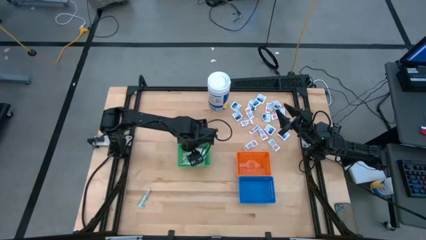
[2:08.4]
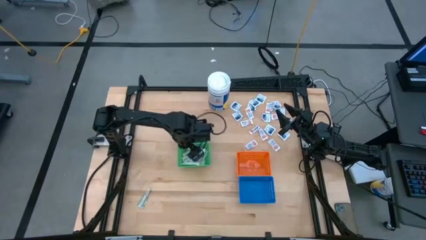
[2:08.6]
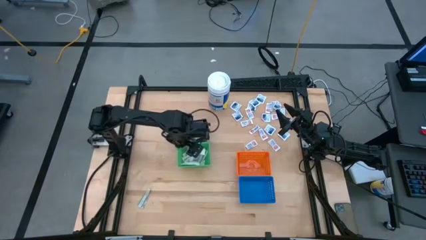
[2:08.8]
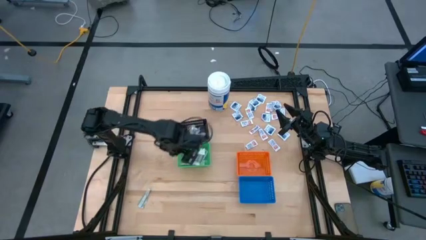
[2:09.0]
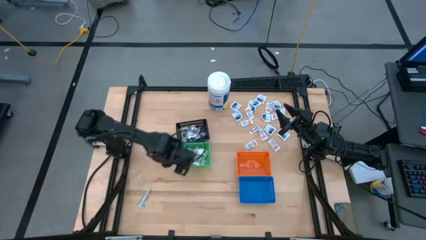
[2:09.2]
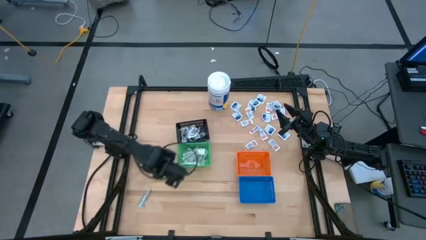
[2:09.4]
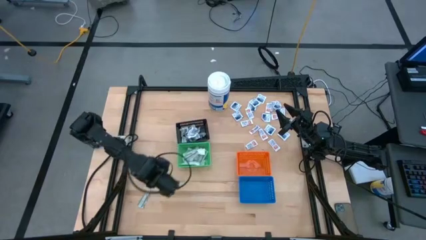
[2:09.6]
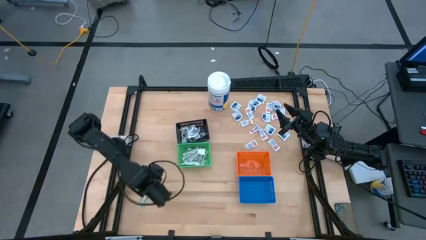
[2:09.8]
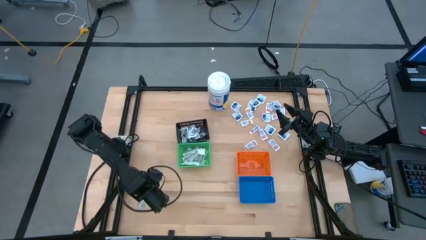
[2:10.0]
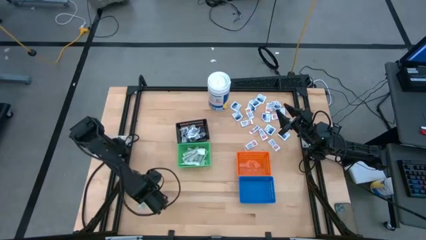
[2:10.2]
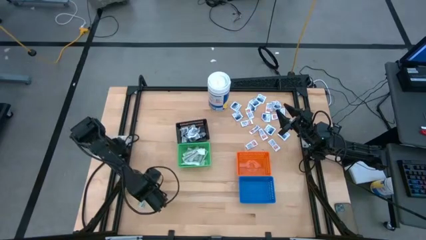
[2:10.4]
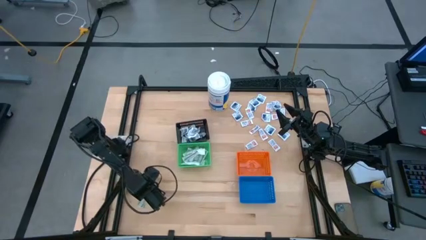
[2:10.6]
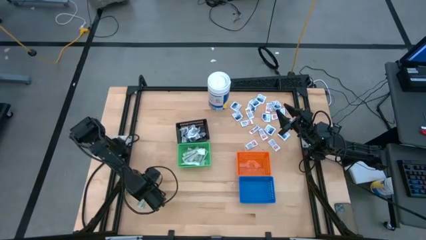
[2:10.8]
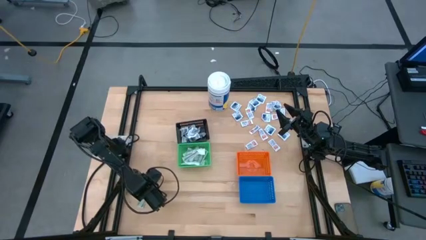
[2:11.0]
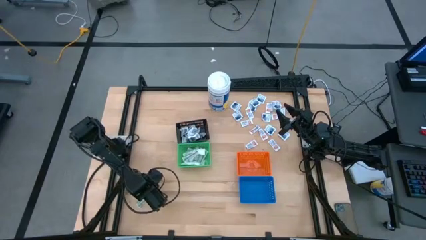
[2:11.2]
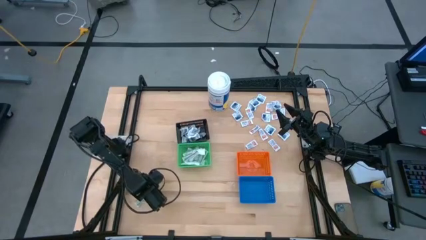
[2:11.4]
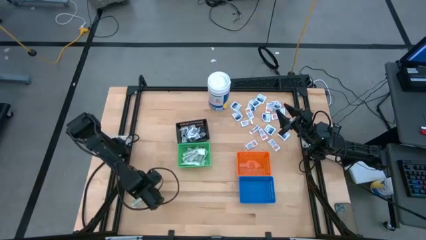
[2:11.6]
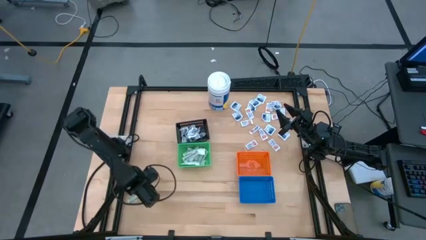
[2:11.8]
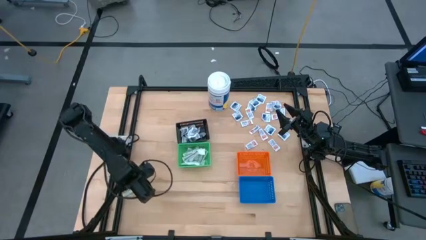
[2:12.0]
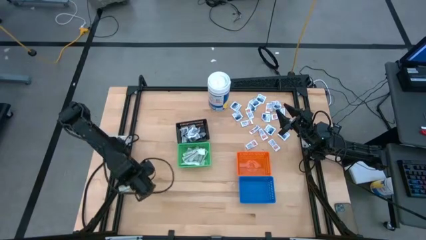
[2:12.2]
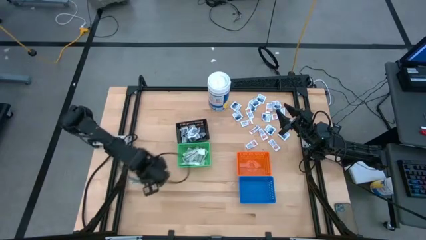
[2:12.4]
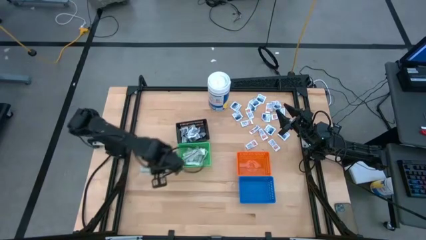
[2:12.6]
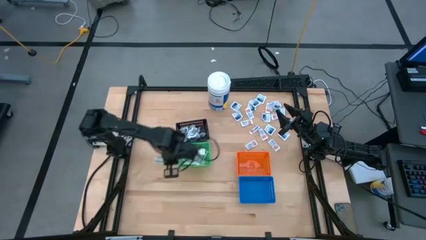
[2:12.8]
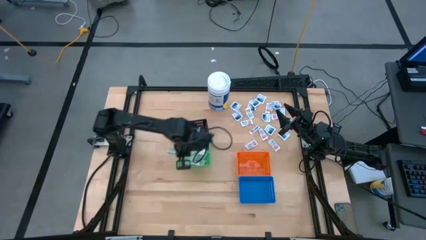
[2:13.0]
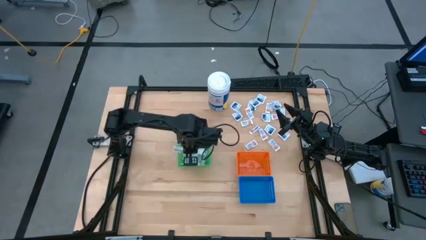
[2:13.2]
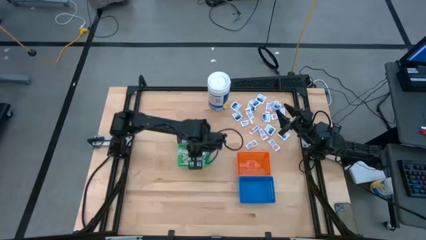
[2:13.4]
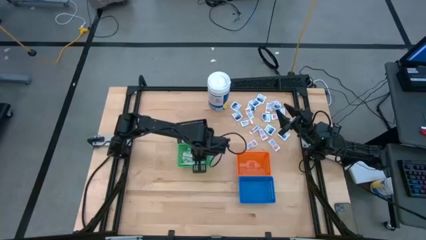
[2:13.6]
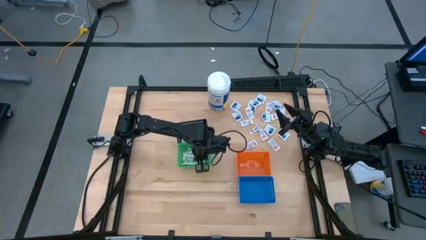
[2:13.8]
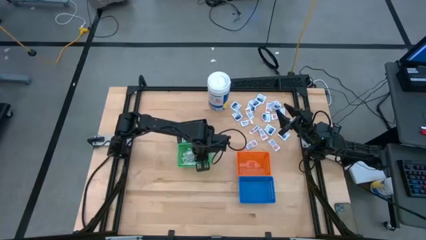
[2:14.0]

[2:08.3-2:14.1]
Task: Pick & Place First Aid Supplies
Put the green bandage into the green bin

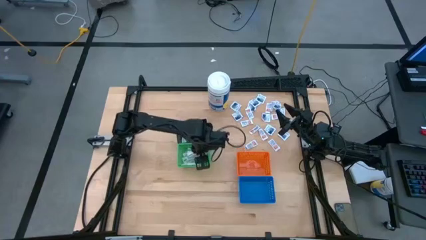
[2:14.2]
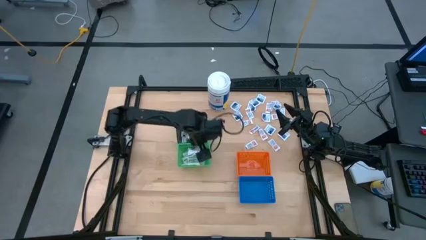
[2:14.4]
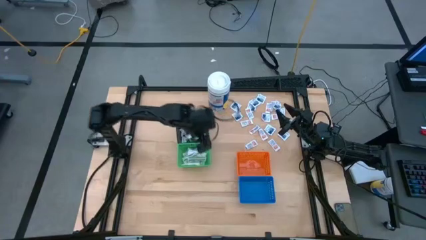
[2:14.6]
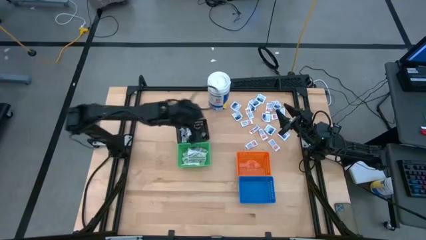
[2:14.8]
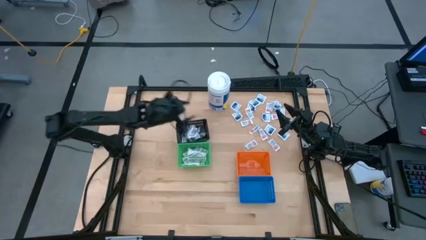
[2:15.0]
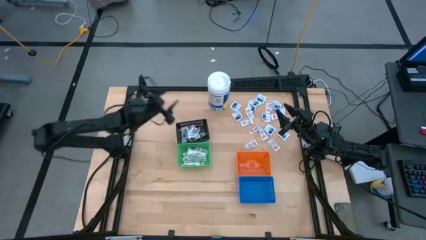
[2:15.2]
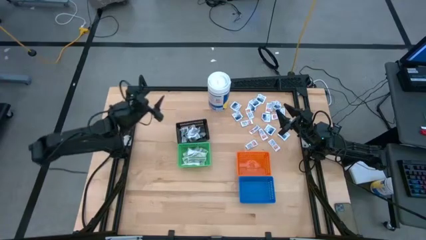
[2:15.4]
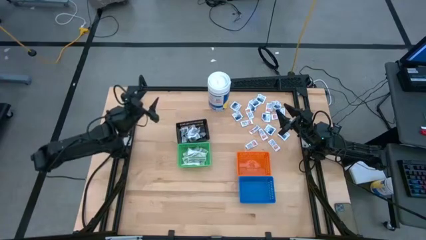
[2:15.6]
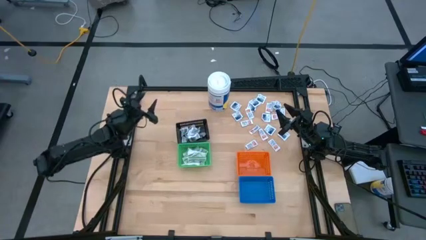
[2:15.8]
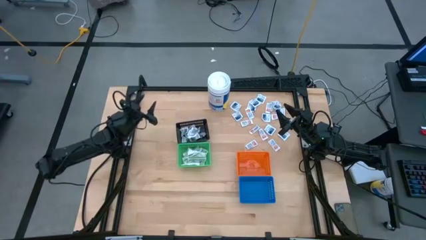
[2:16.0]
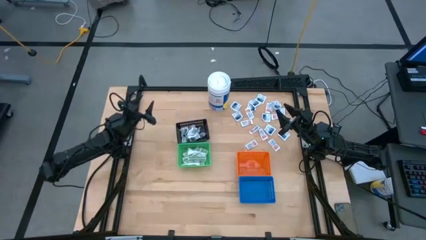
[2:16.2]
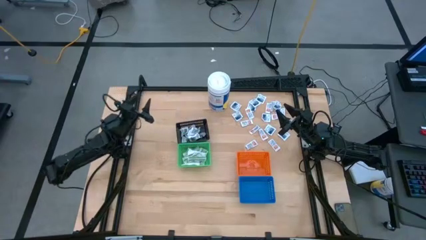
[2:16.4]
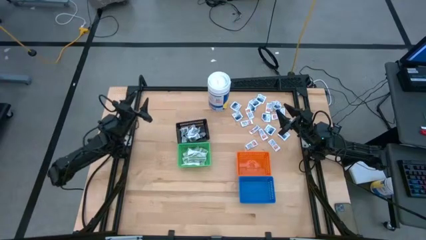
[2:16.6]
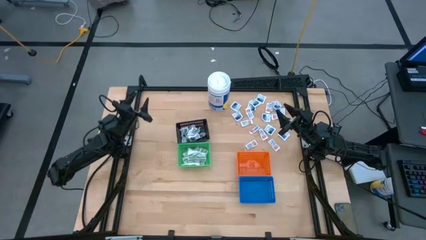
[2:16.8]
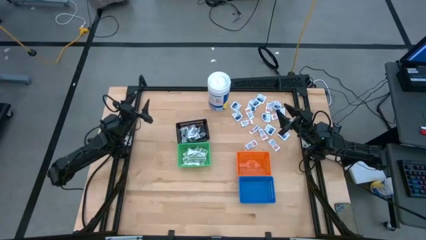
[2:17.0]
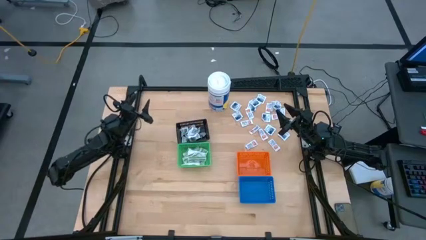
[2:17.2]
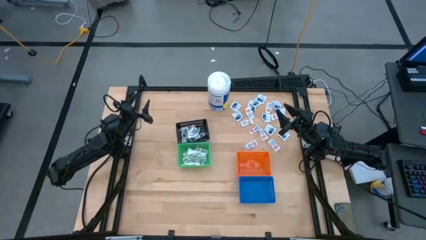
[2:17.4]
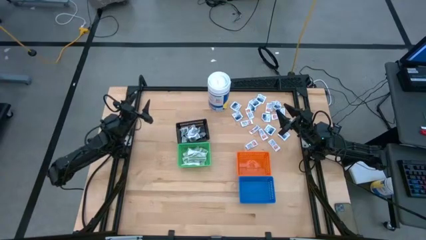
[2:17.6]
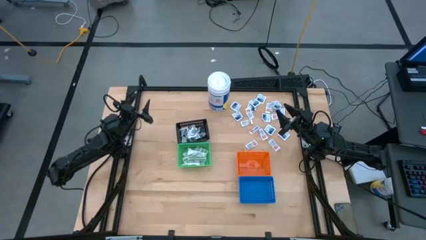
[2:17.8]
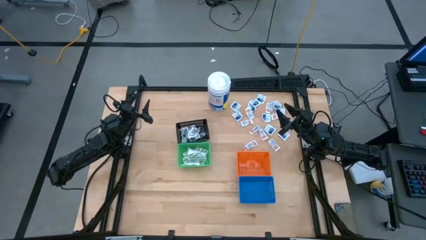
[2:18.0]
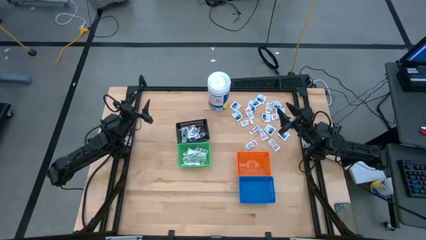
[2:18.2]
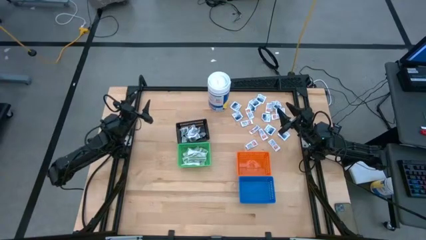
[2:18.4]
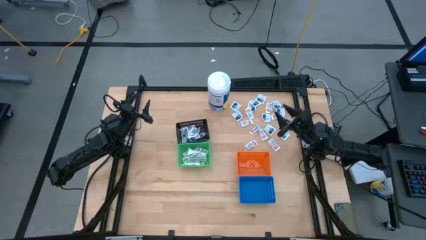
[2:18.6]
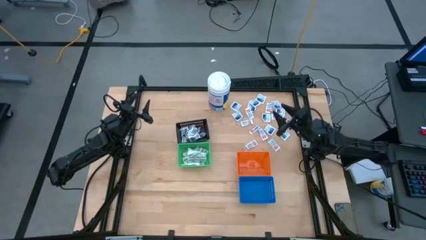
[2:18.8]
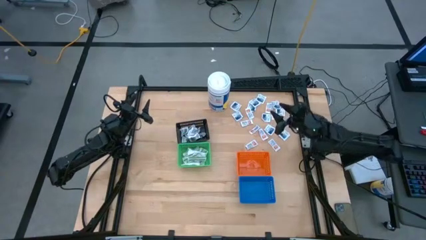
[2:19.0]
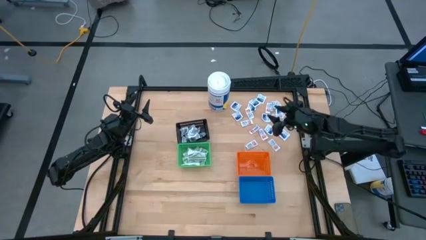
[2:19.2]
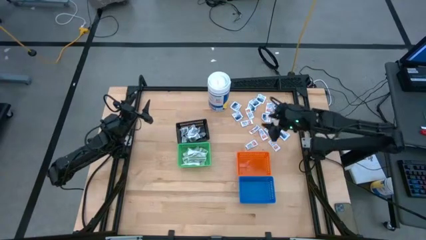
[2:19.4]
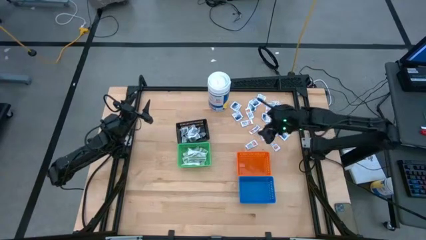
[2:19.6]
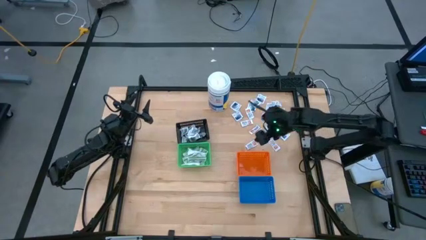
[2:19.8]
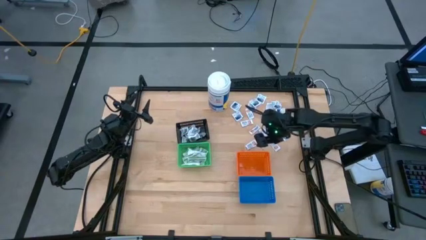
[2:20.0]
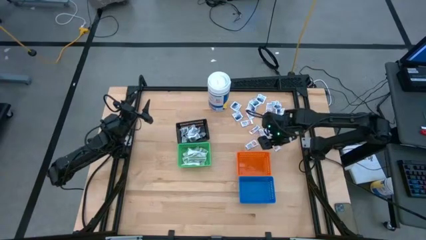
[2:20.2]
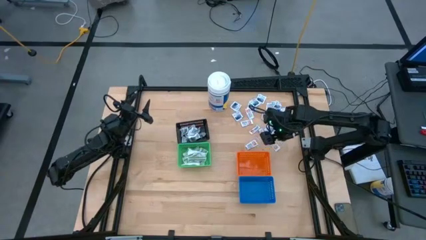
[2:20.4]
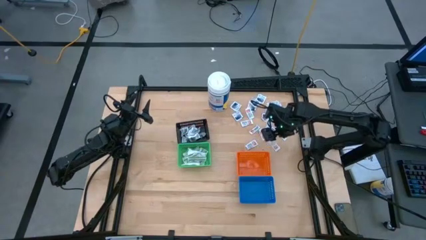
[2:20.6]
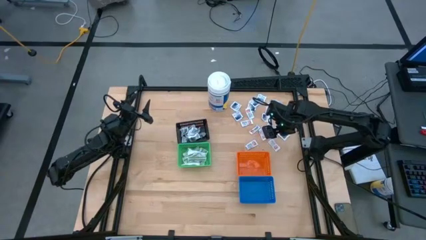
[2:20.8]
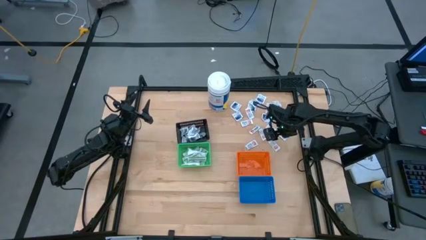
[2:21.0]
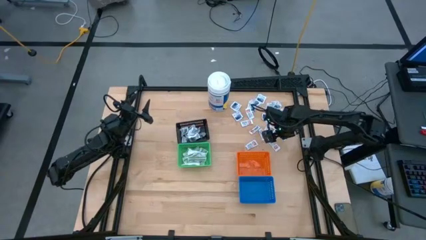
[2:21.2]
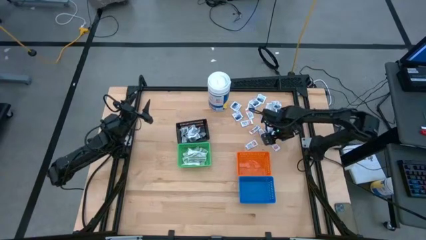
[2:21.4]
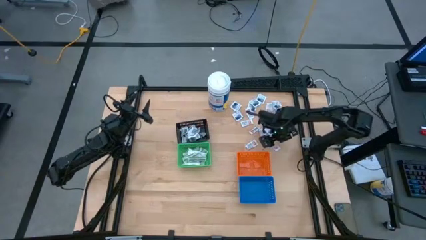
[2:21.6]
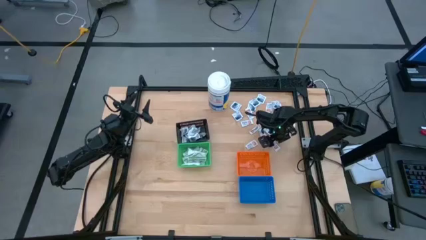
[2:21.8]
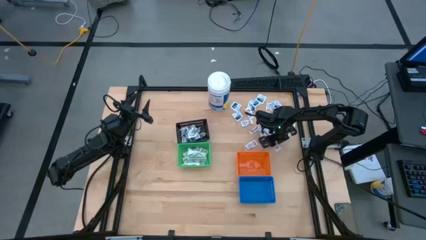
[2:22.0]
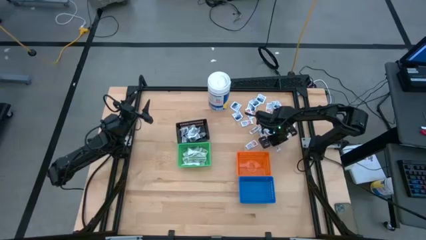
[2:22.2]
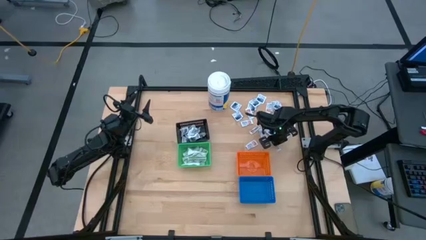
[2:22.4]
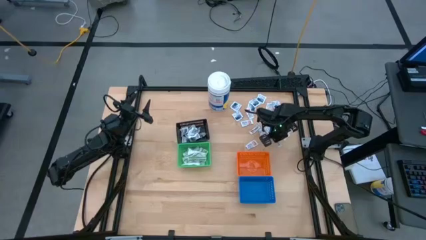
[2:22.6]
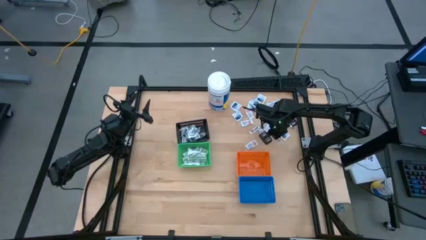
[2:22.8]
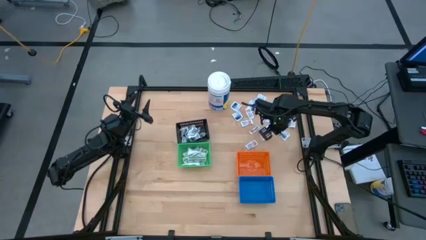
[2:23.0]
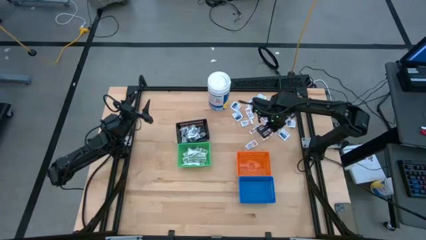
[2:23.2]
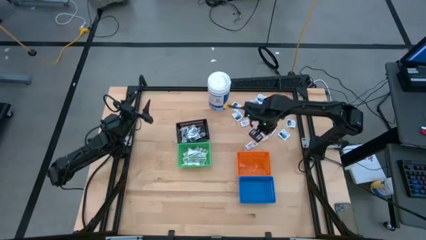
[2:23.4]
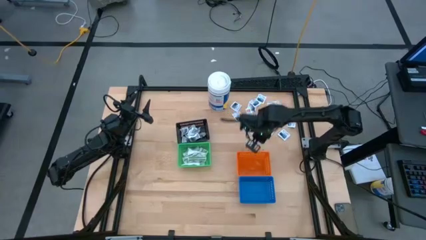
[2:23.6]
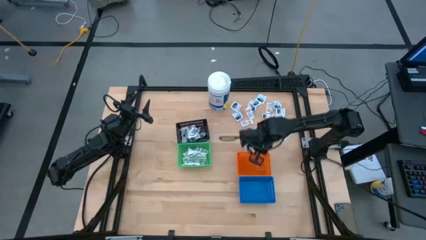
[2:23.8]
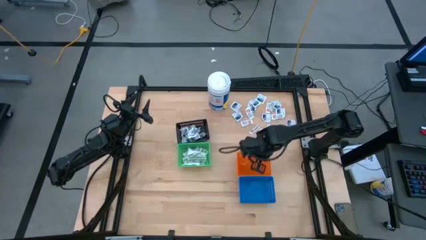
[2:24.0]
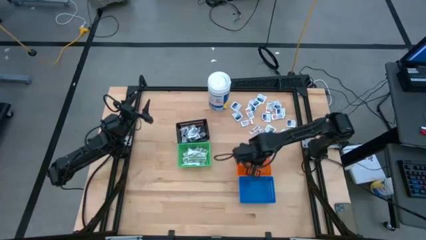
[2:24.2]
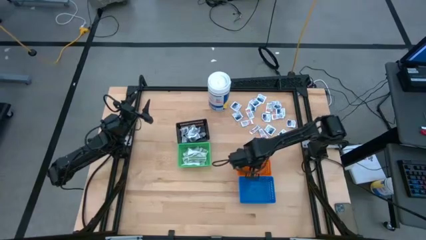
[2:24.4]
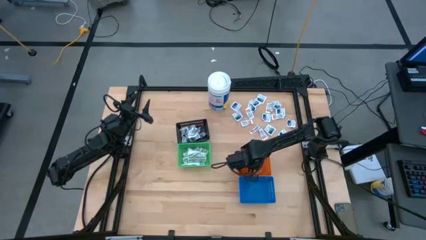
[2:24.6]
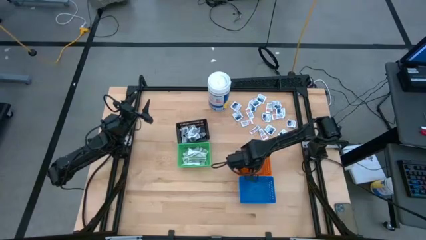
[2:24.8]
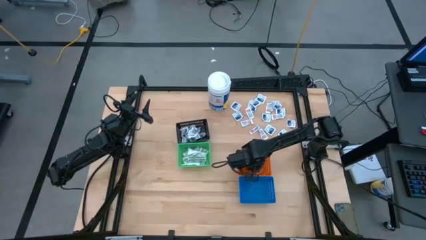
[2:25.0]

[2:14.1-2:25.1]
Put the orange pad into the orange bin
